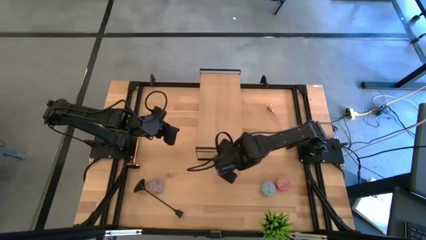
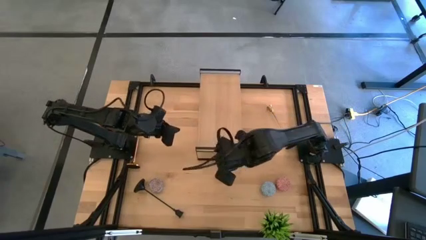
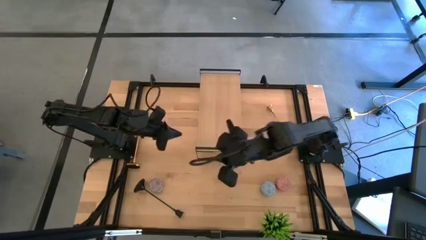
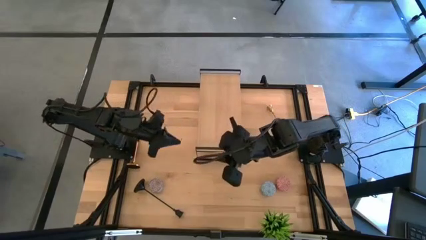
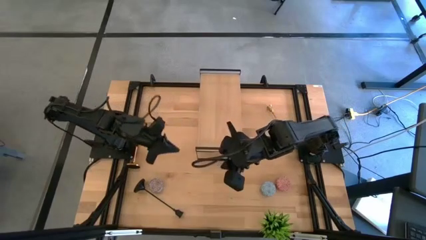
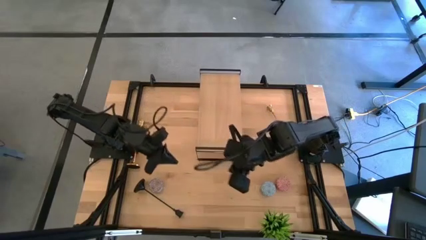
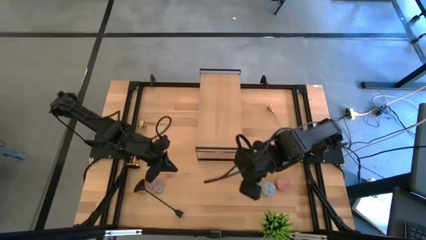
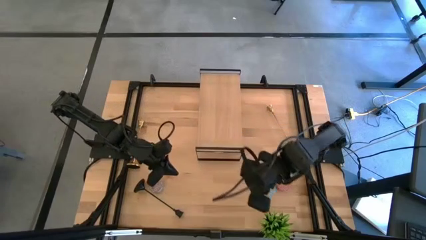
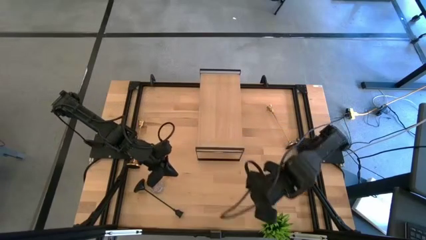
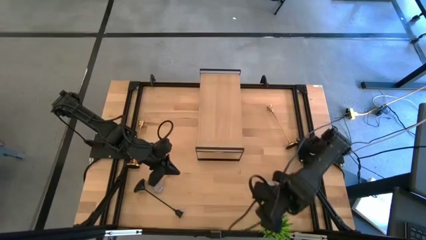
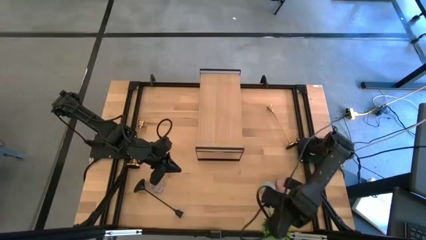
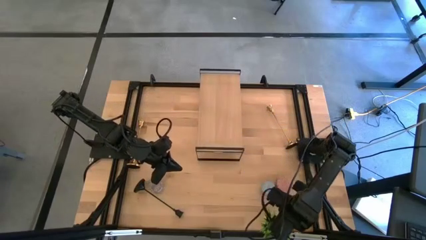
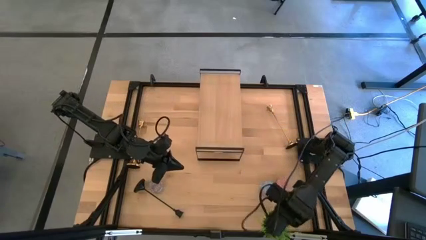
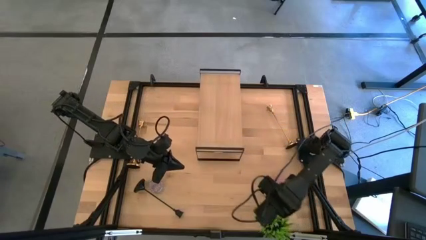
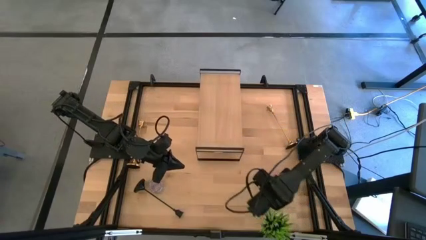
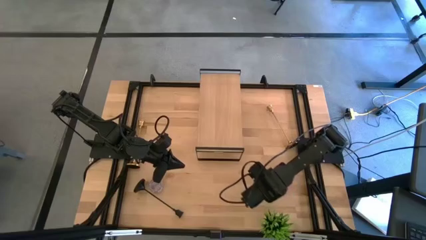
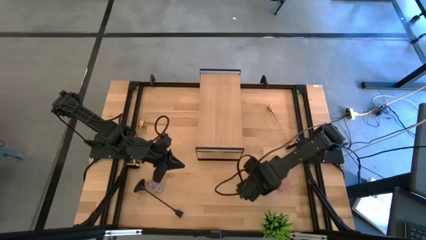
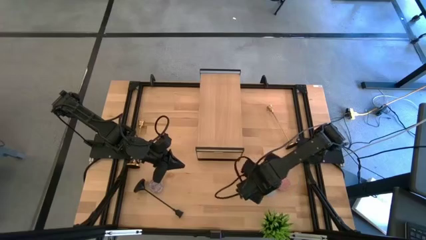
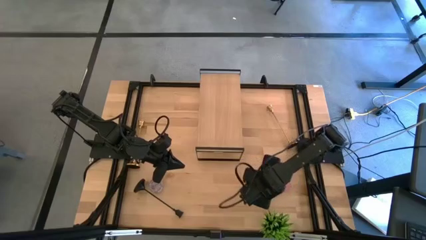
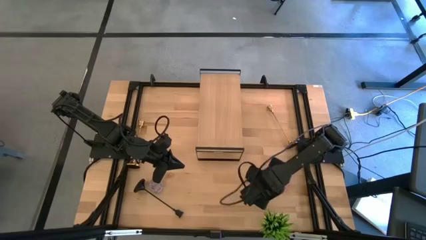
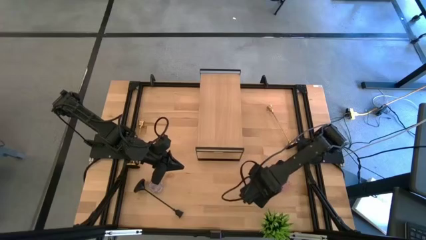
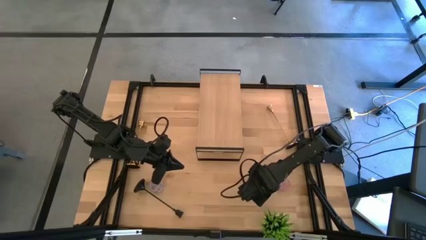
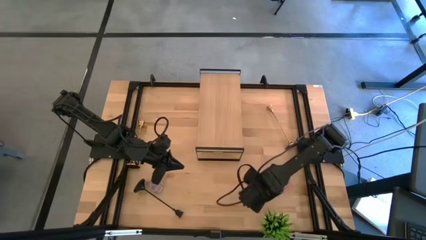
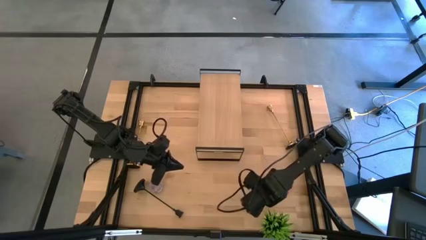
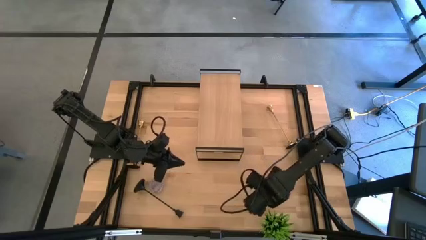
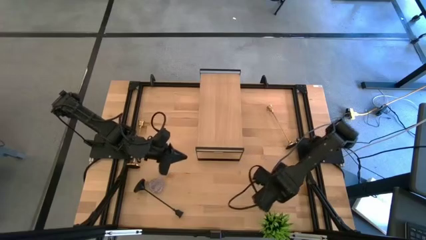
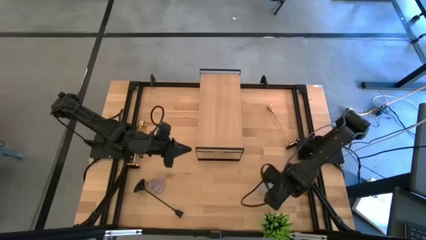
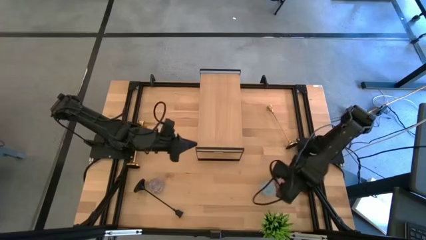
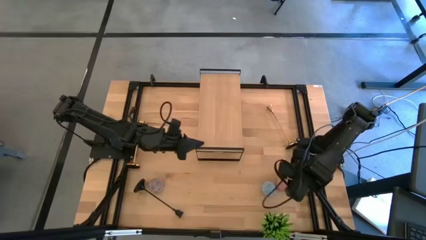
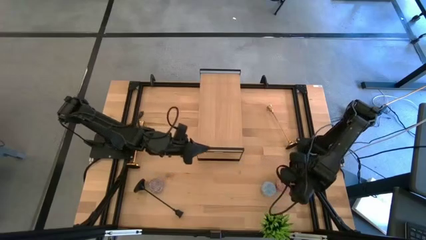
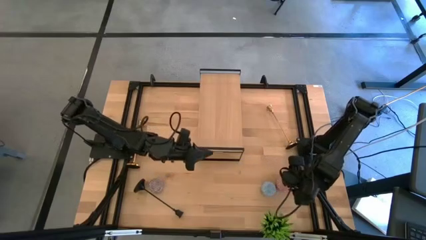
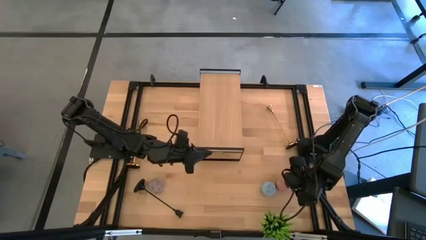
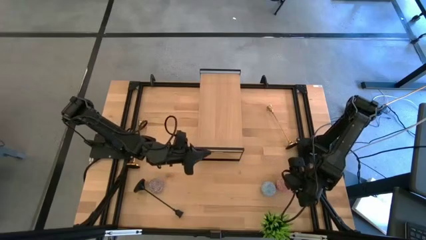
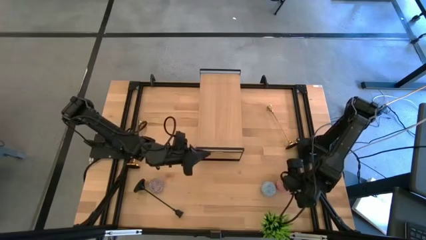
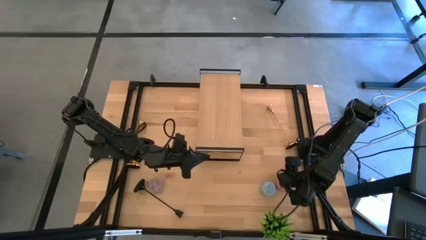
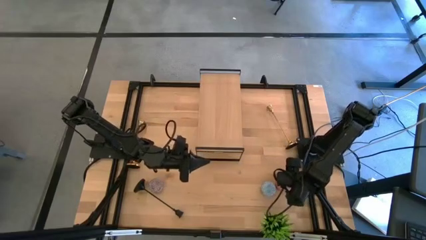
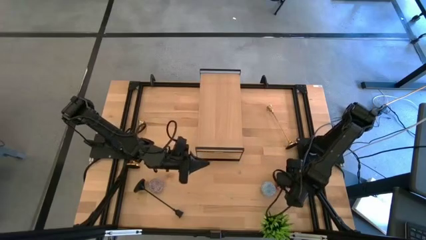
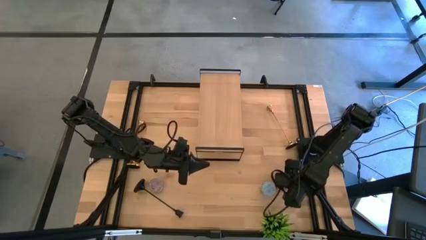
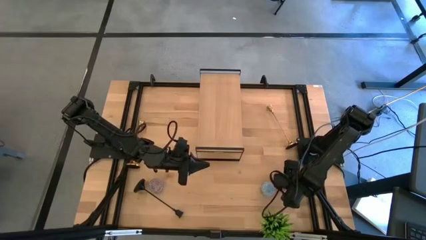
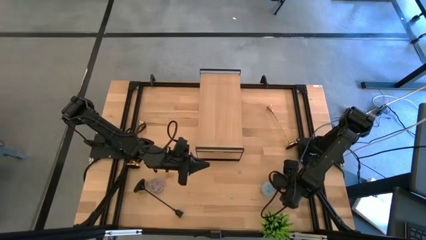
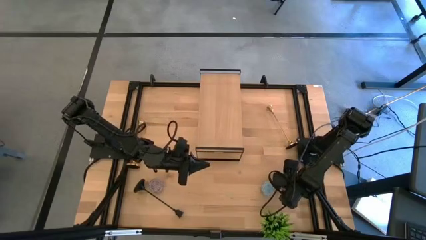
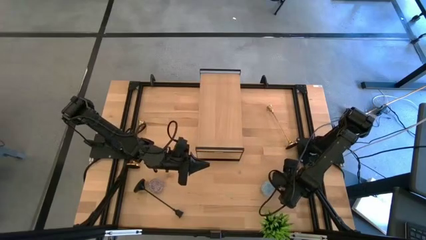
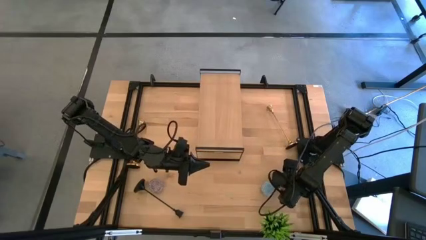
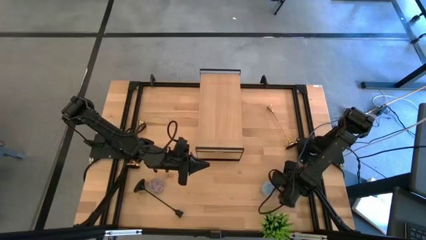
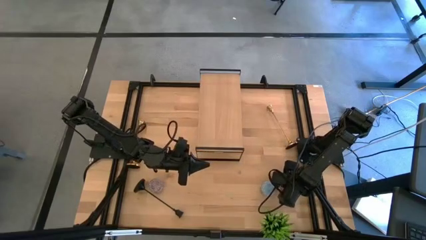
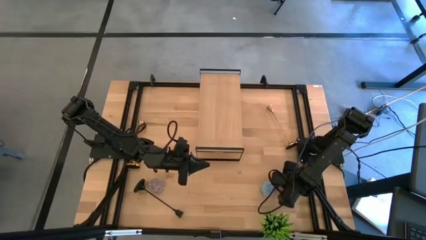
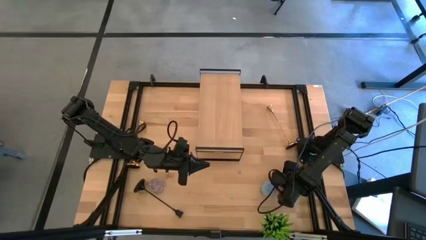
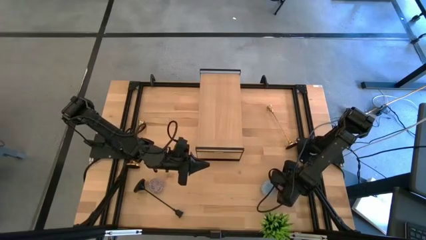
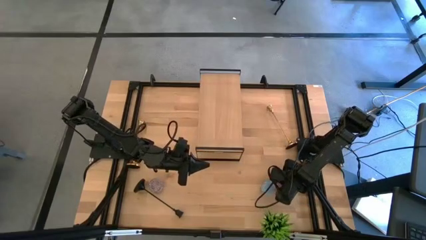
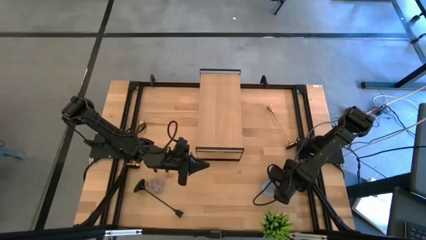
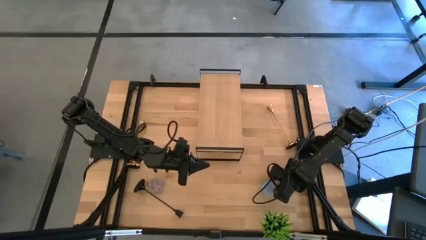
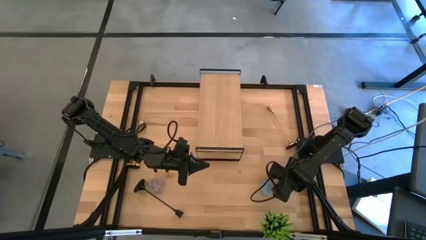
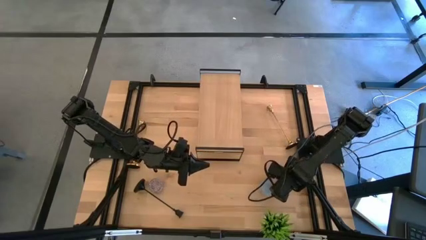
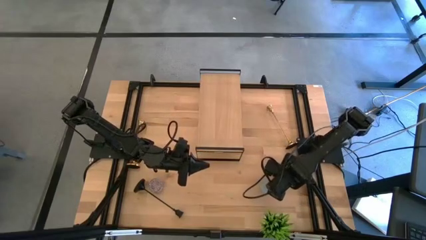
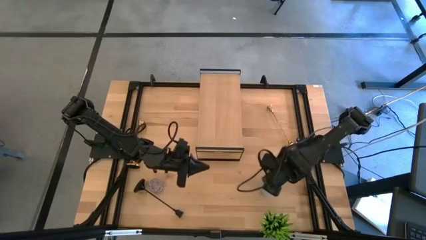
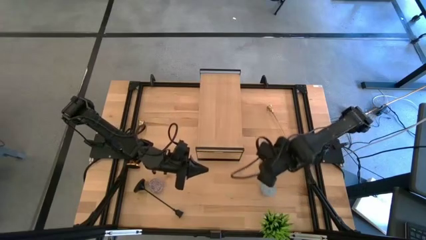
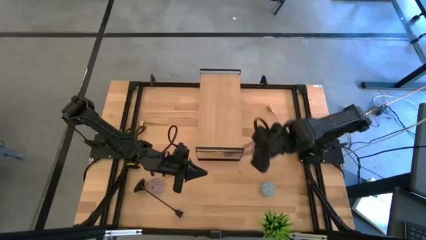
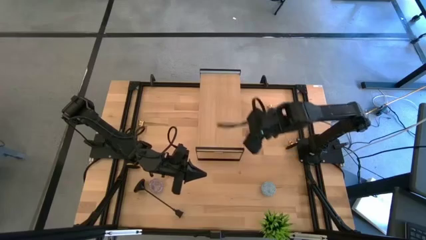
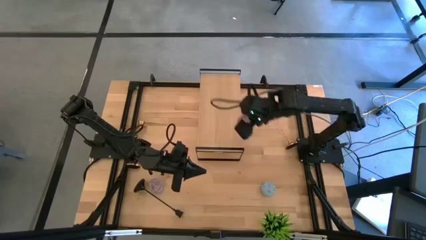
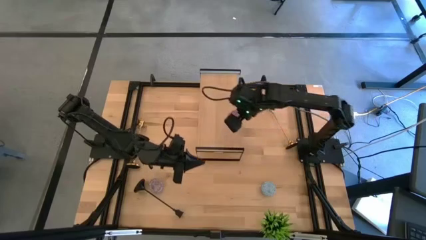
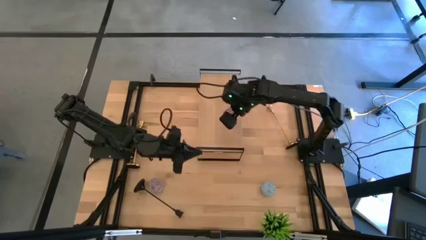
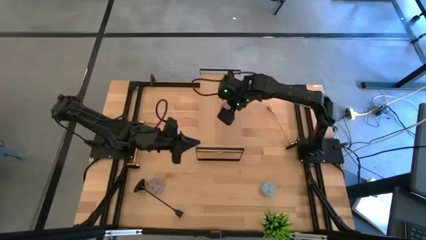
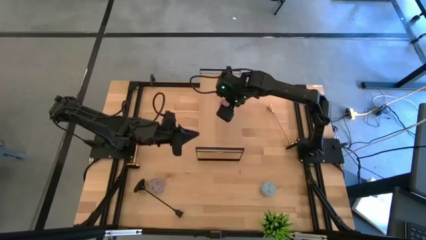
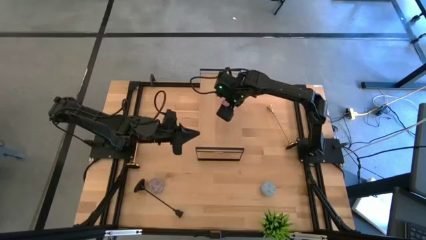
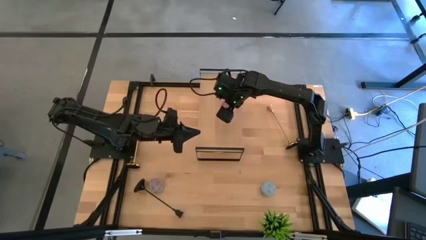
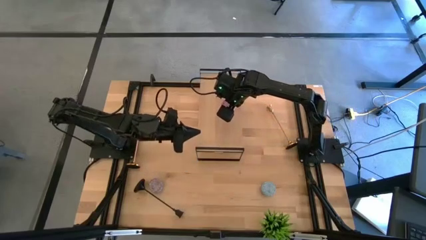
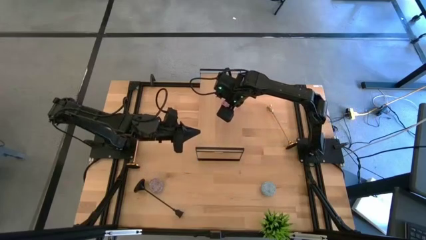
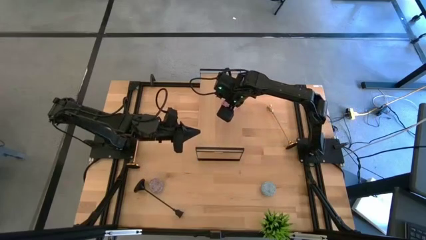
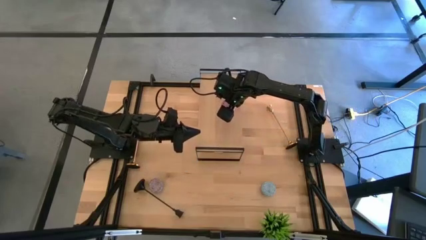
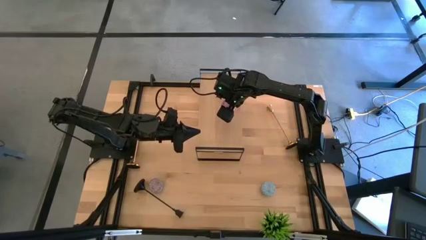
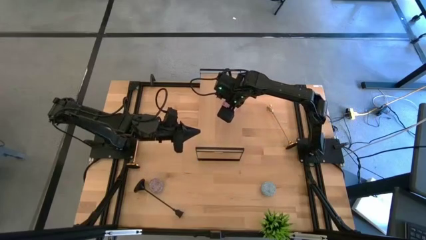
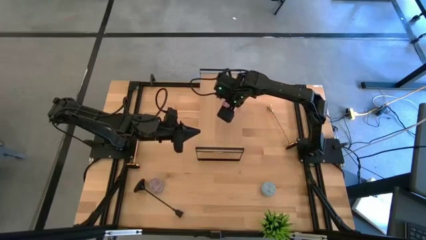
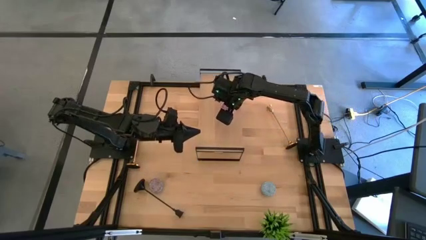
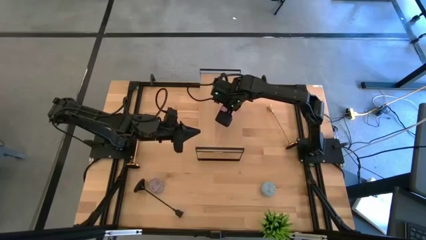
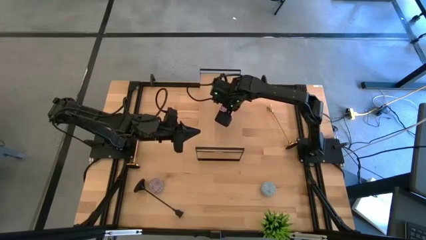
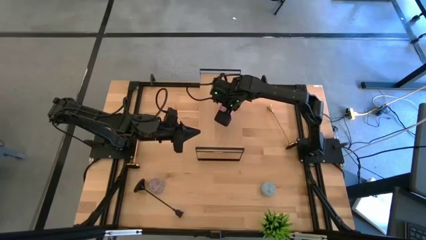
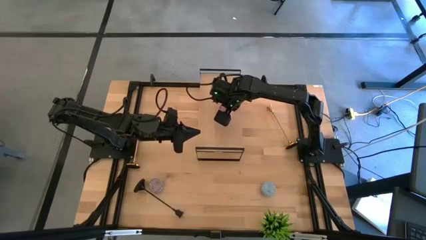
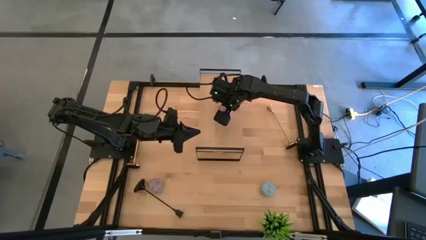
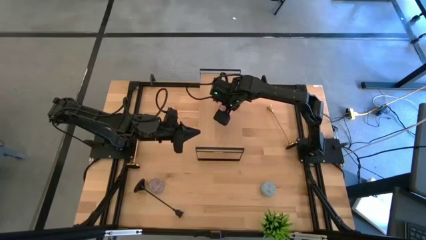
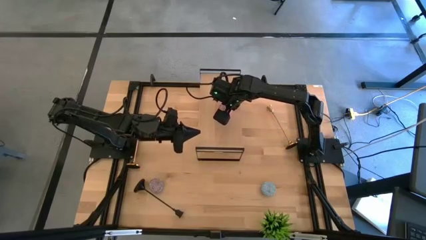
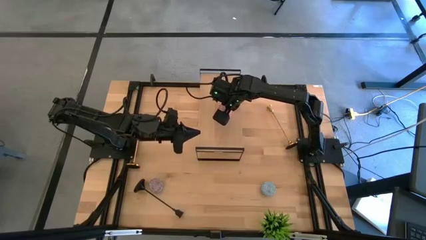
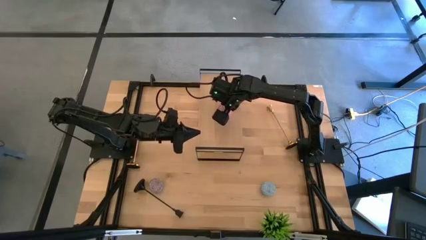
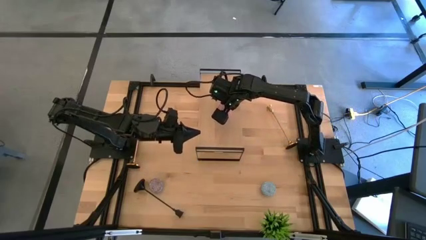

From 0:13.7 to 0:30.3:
Task: Pick & Place candle stick holders
Put the pink scented candle on the shelf
